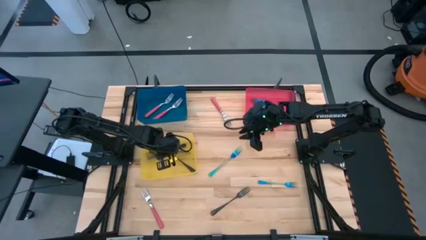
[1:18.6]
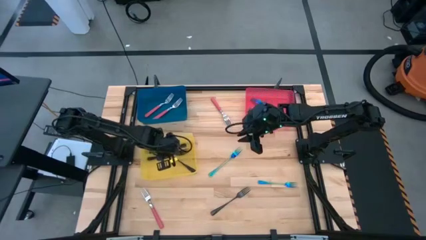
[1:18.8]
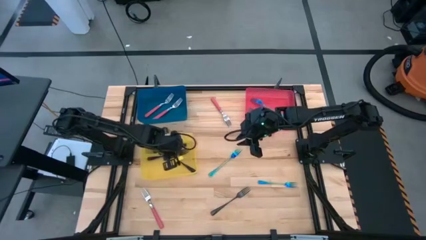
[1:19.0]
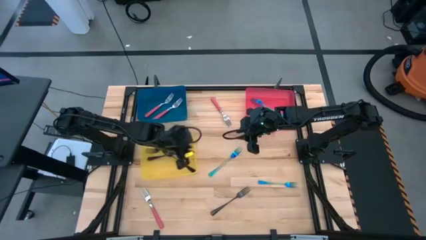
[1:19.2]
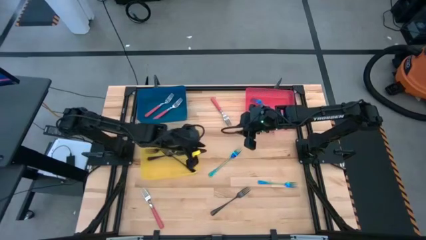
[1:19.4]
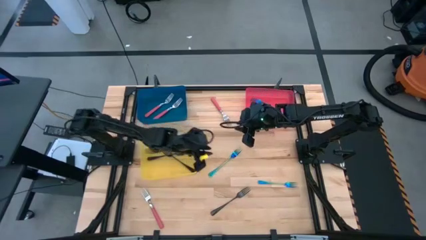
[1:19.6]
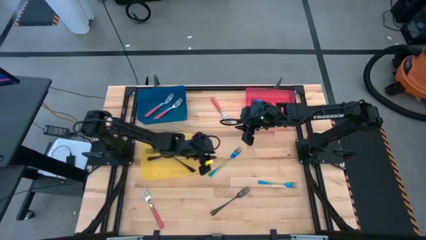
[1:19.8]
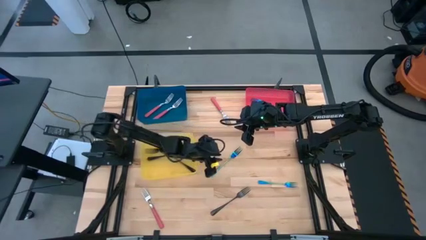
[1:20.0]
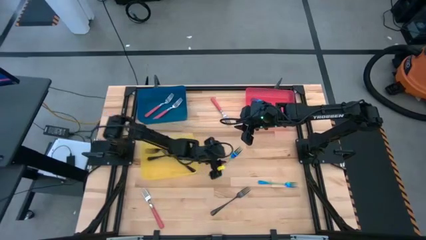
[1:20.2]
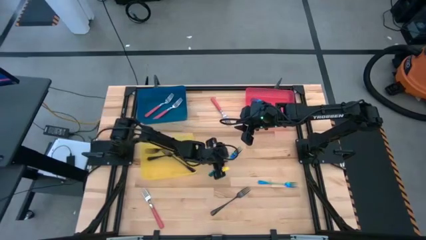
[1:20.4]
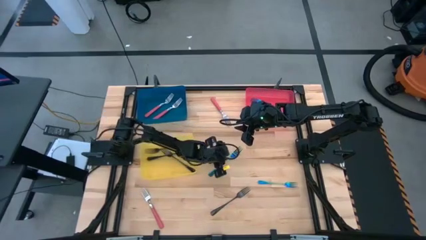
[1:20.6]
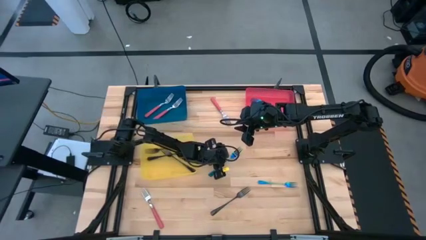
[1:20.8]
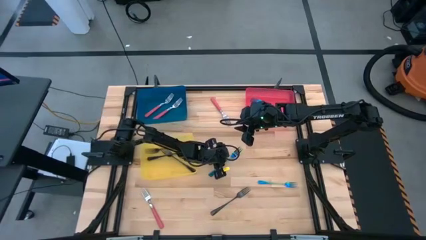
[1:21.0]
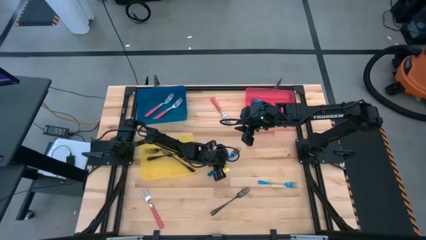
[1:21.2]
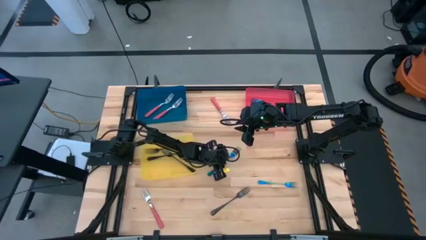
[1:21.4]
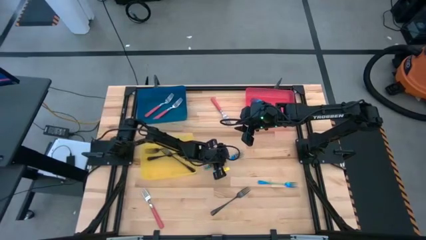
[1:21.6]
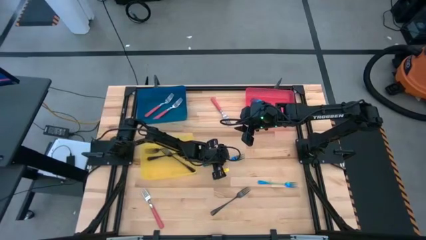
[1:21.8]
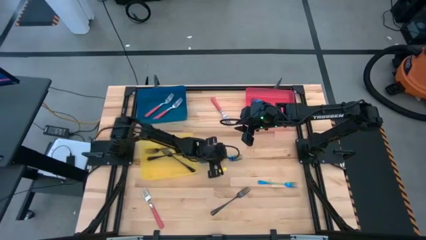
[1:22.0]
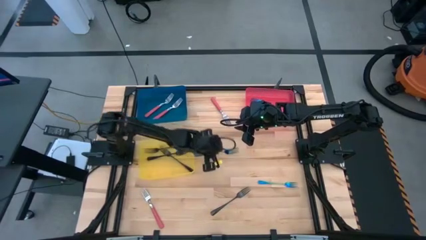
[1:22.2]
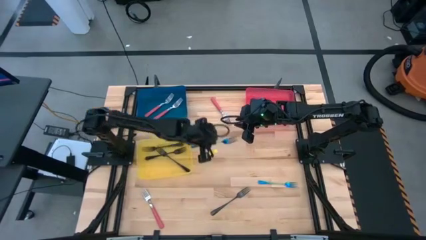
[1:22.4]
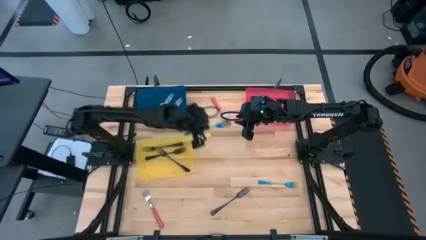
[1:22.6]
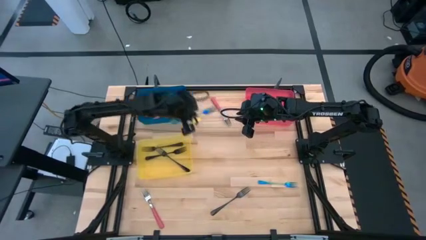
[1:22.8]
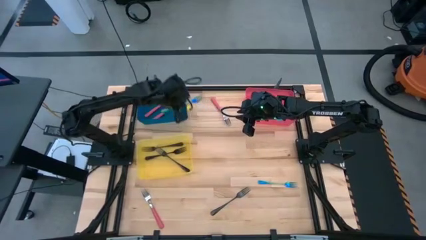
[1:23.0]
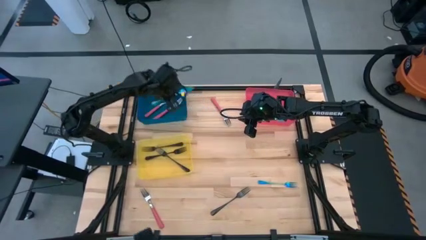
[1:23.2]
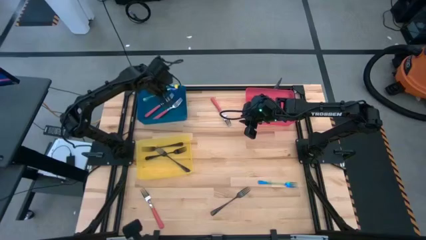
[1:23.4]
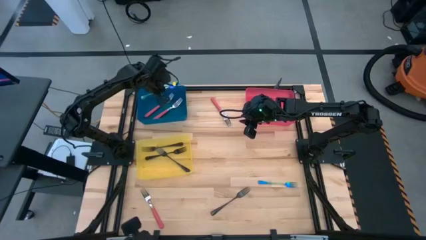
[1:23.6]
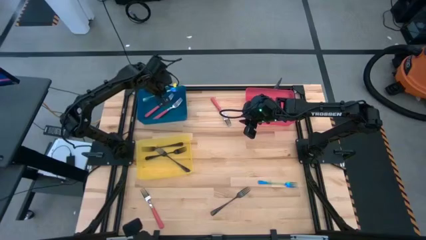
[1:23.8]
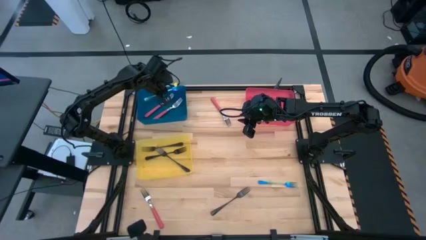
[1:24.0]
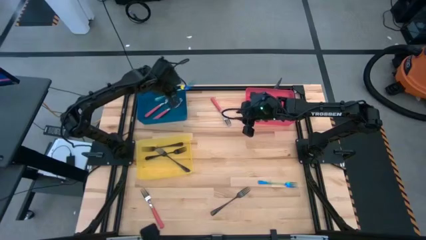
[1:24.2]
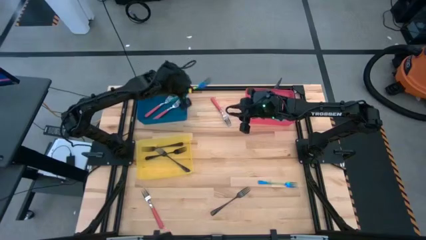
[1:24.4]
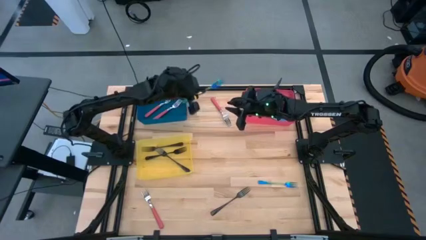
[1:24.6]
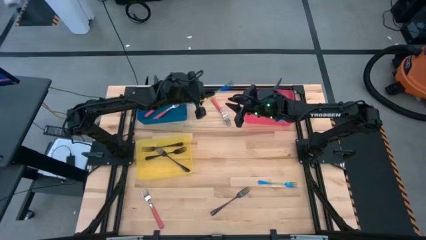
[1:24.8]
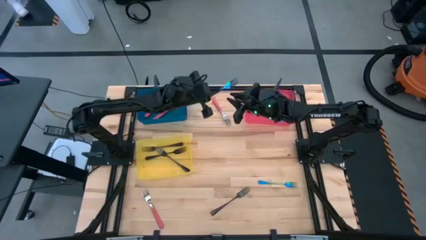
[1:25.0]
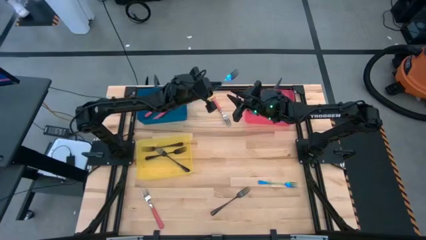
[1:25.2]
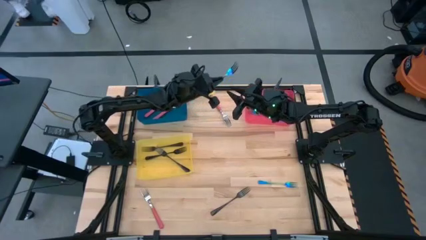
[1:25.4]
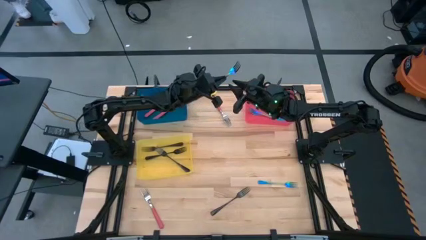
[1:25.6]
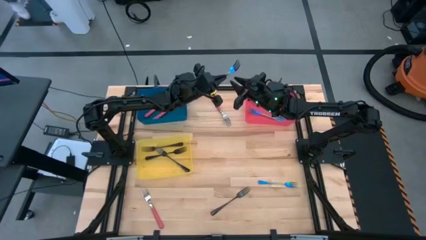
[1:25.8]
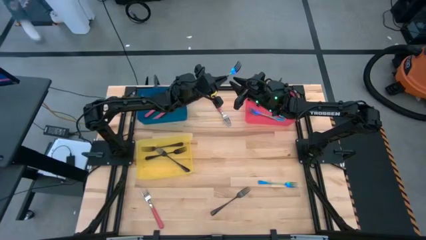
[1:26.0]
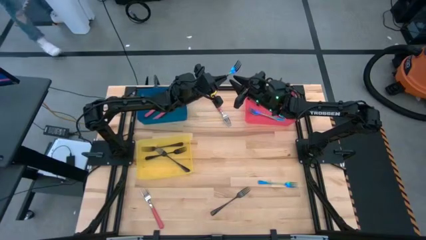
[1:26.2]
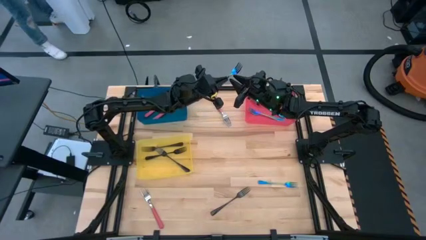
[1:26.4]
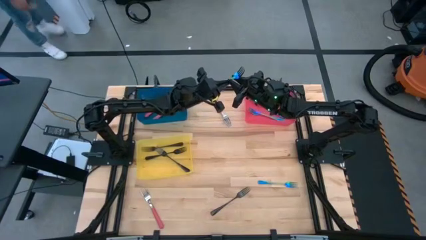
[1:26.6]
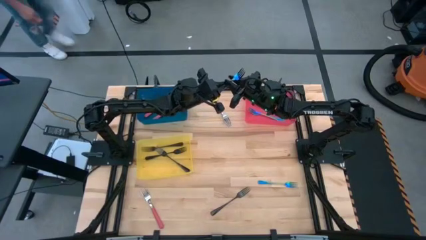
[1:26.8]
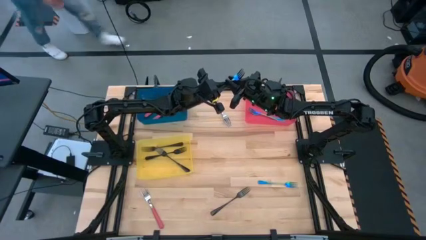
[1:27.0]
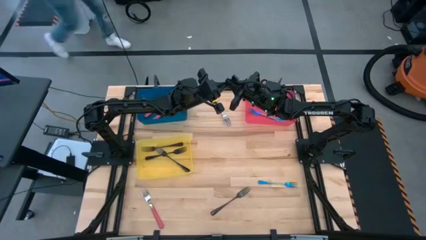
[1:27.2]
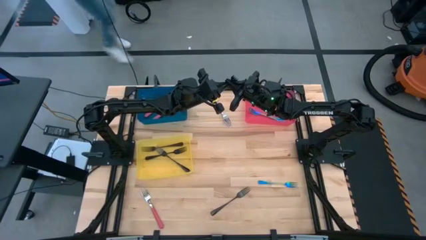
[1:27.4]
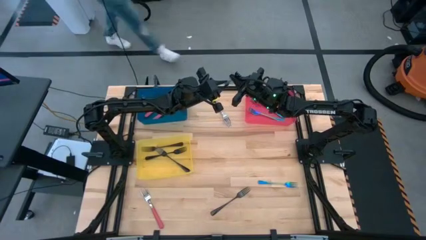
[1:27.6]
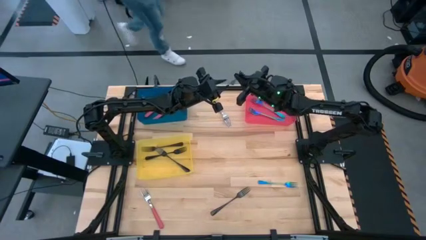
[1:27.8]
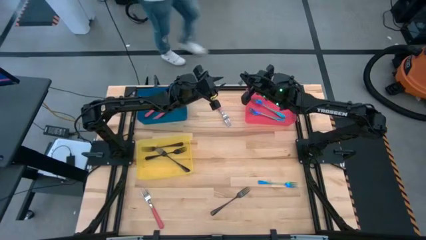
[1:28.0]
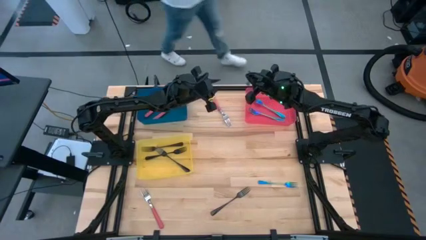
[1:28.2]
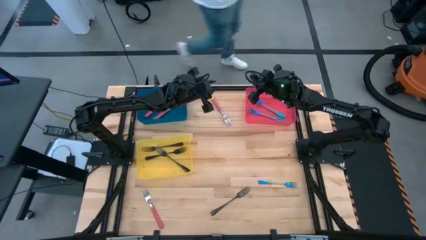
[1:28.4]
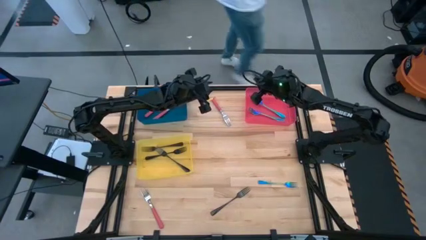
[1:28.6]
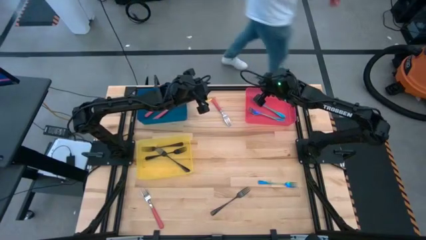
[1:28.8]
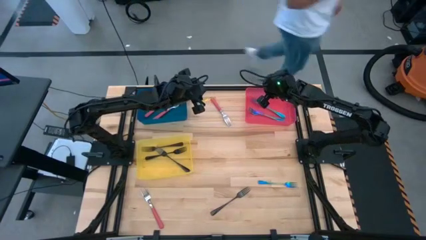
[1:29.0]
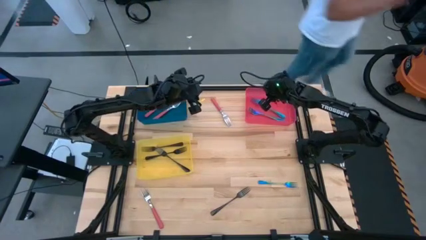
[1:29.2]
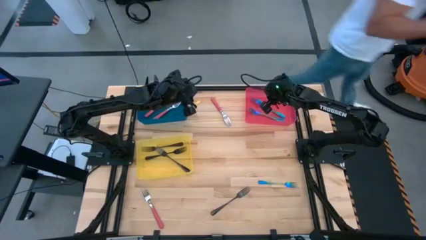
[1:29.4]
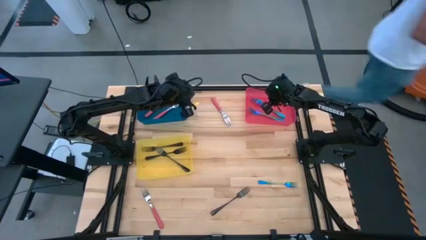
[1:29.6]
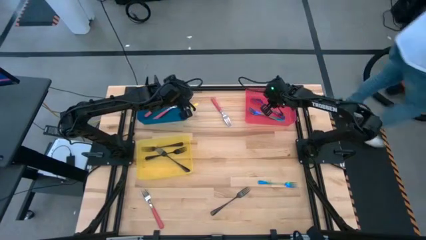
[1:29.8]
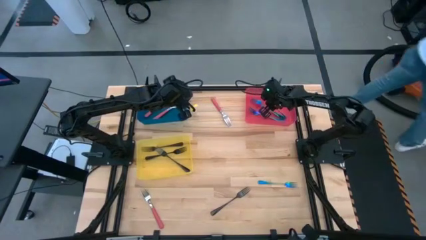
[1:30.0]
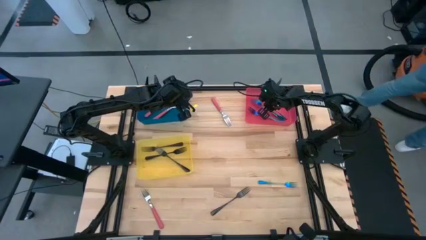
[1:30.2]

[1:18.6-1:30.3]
Task: Sort silverware by color (type)
Put the left blue fork into the red bin

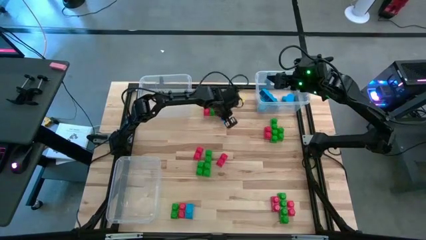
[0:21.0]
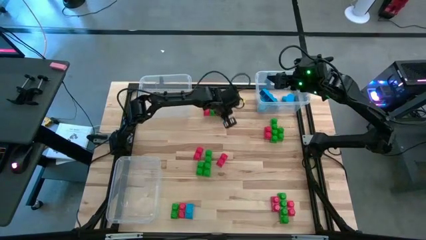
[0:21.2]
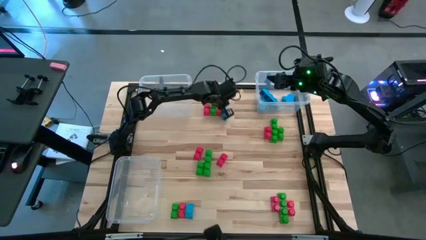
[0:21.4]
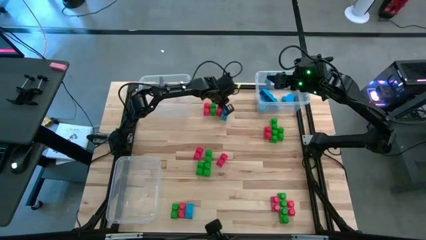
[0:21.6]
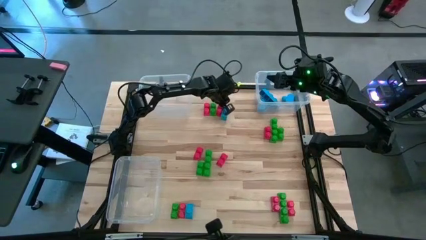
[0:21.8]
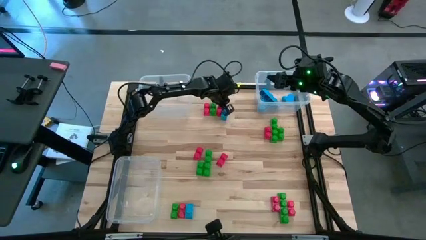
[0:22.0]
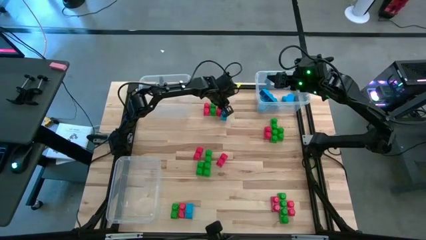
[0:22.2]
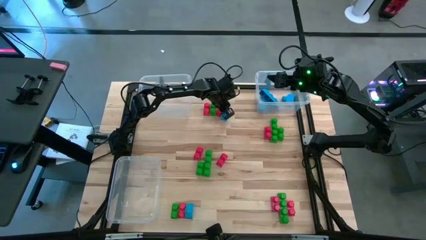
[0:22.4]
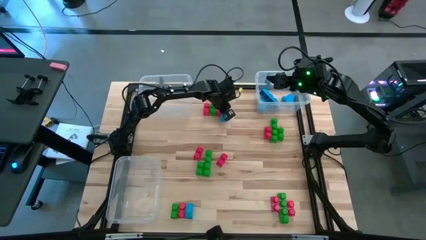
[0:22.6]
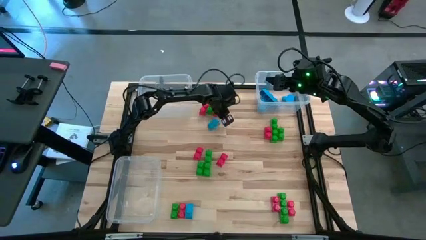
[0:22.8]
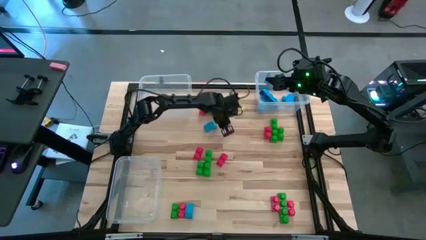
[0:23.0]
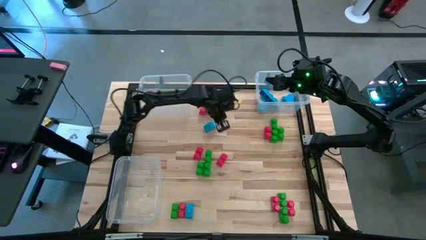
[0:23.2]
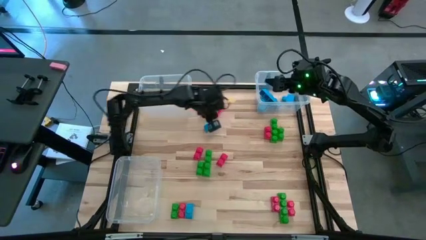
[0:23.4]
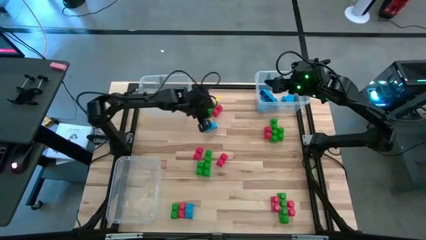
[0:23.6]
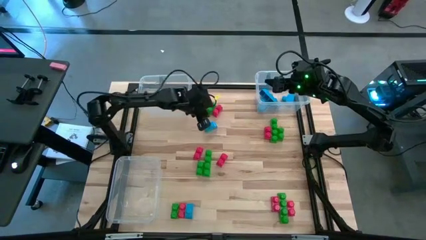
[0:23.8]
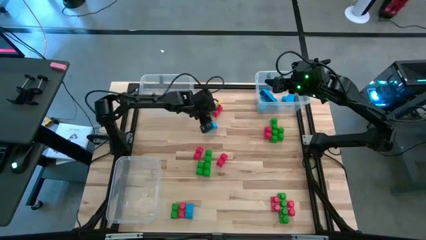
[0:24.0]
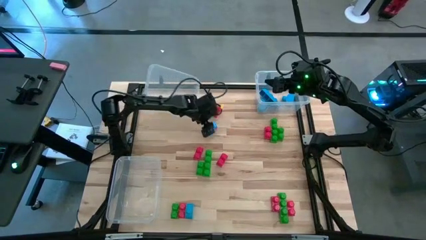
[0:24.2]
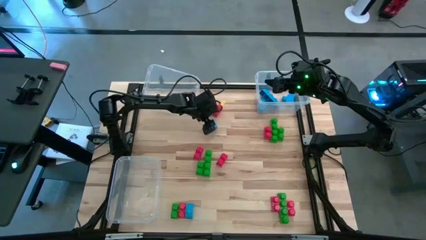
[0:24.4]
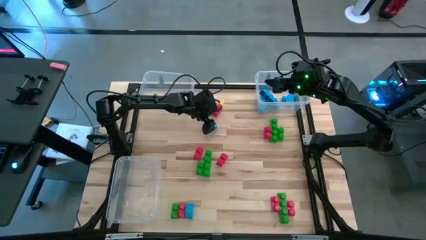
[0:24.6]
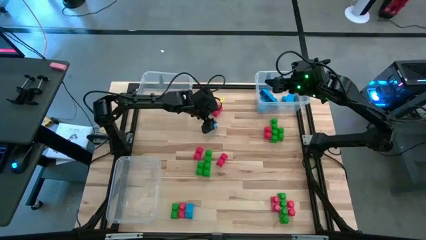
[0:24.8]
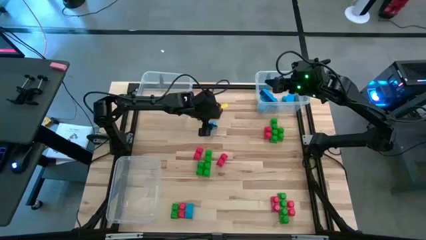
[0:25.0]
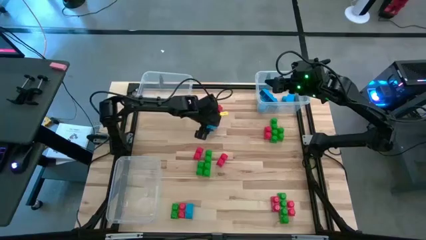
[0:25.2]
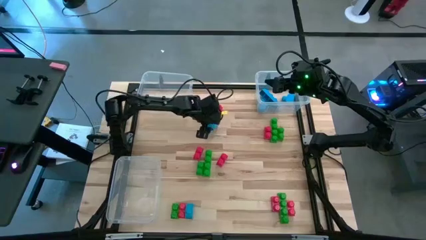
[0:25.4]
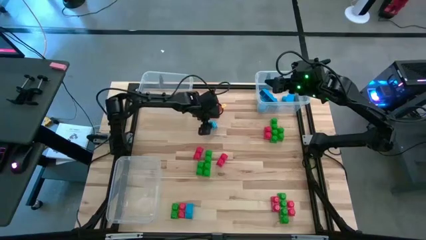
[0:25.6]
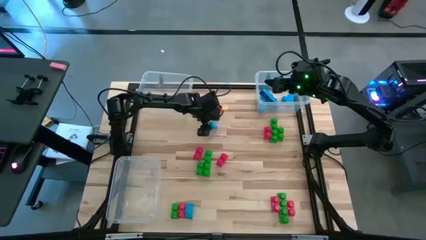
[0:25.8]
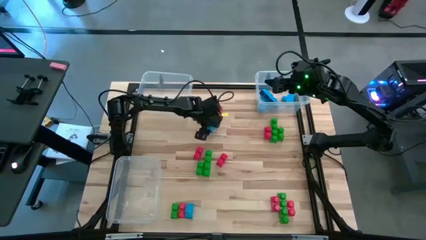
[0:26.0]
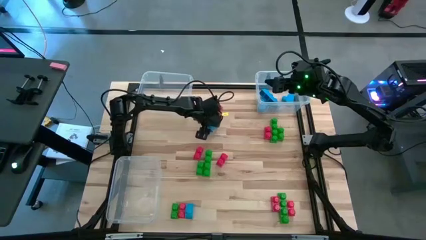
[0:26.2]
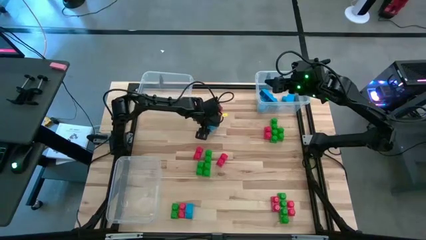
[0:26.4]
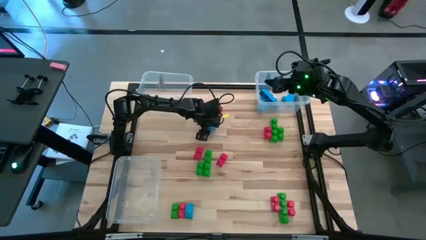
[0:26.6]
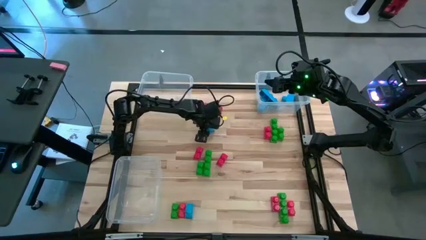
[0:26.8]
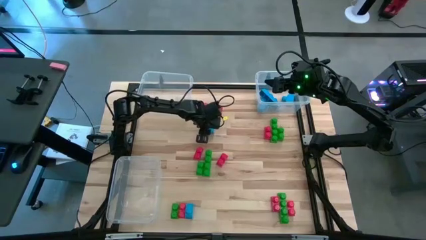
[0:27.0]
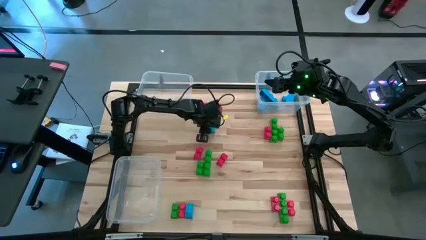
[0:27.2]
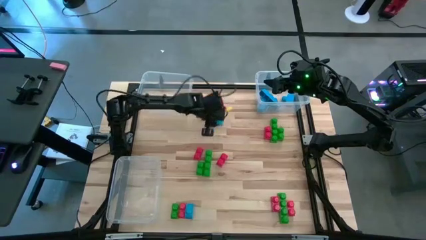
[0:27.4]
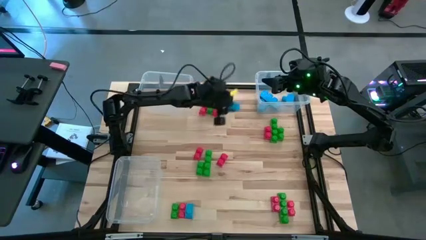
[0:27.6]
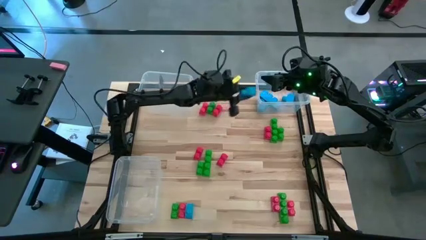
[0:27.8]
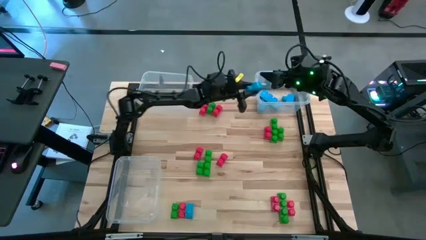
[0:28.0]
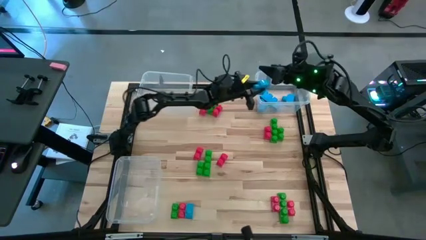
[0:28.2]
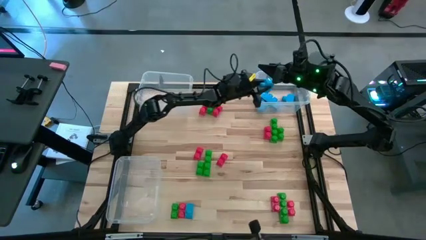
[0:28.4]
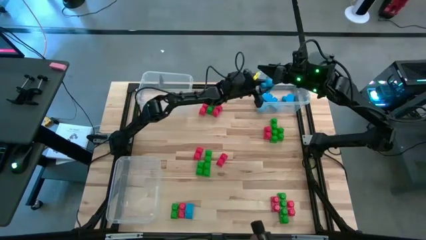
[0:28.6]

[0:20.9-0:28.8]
Task: Sort blocks
Put the blue game piece into the top right transparent bin
